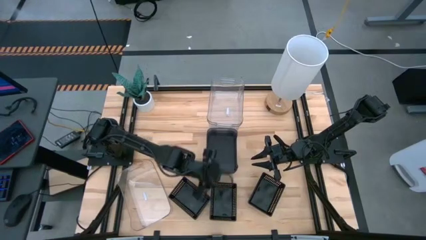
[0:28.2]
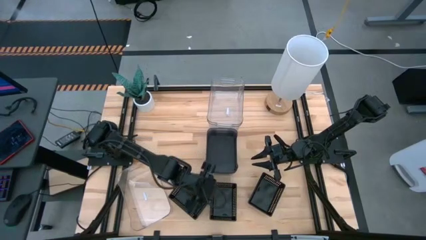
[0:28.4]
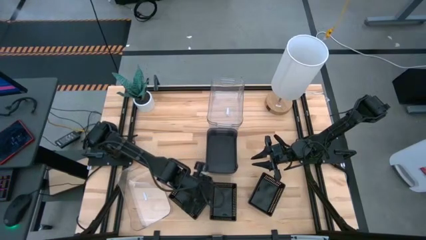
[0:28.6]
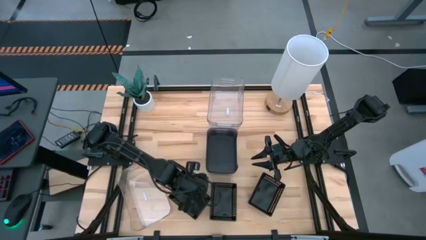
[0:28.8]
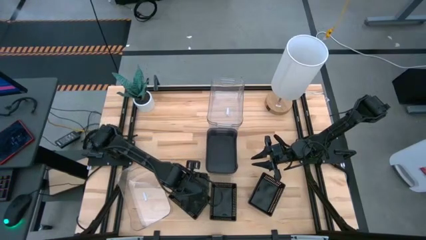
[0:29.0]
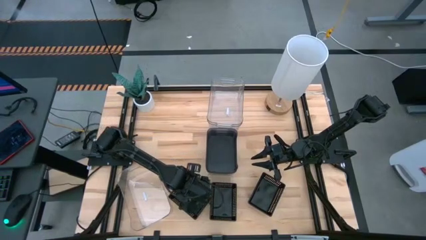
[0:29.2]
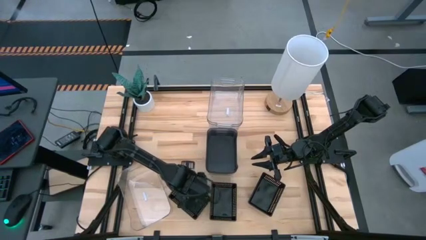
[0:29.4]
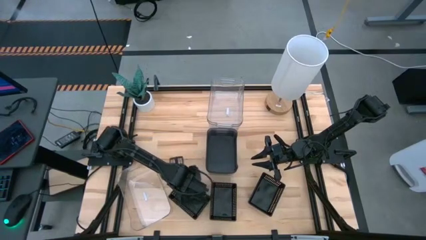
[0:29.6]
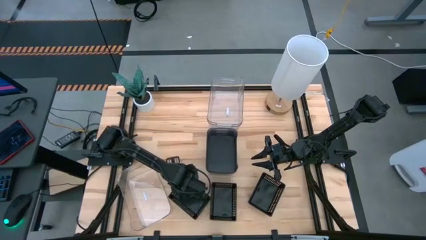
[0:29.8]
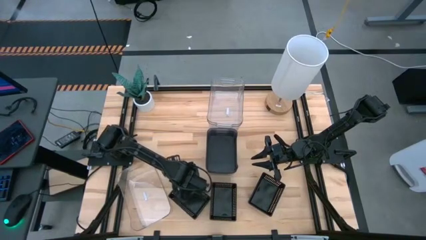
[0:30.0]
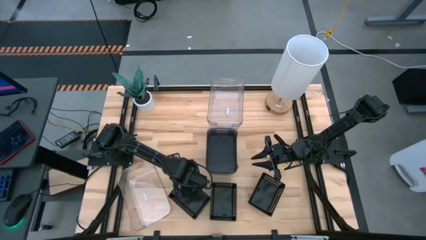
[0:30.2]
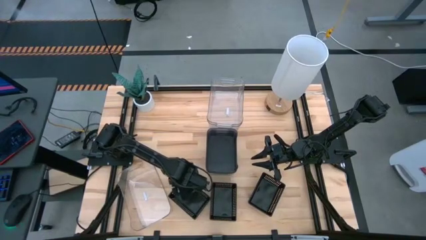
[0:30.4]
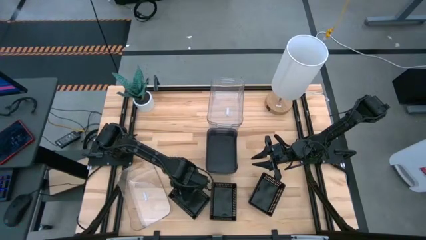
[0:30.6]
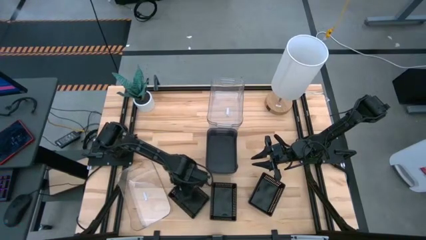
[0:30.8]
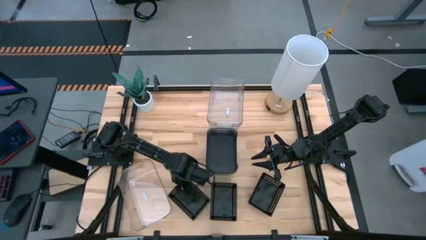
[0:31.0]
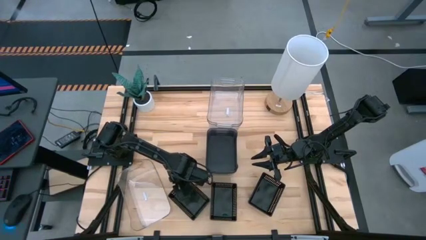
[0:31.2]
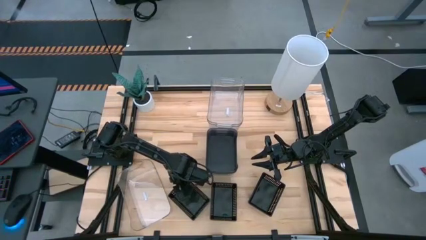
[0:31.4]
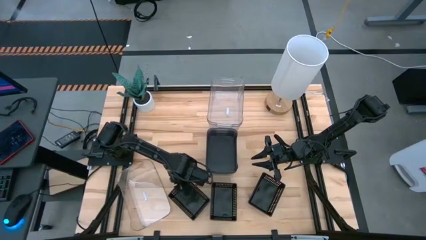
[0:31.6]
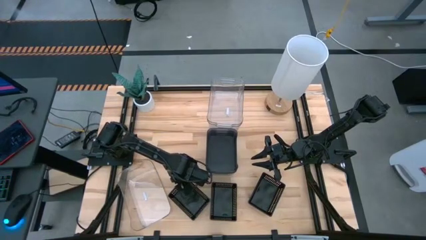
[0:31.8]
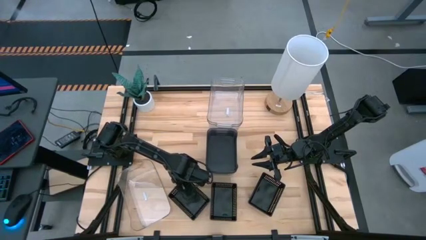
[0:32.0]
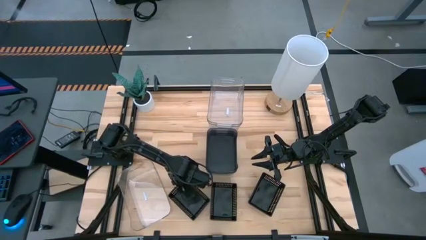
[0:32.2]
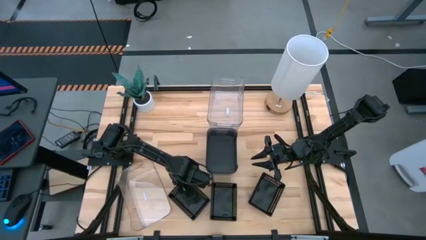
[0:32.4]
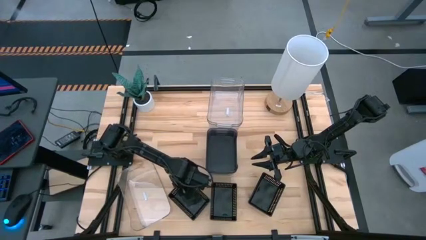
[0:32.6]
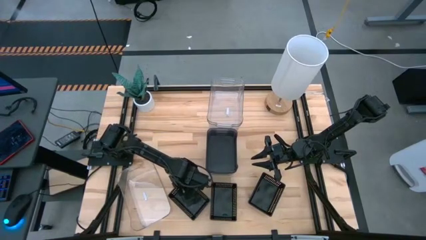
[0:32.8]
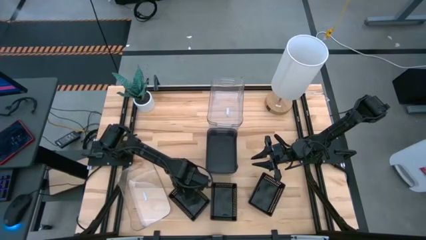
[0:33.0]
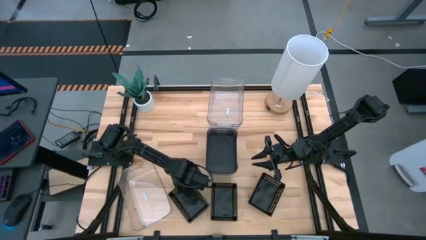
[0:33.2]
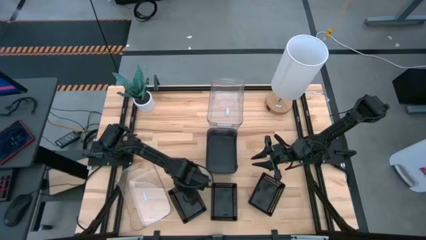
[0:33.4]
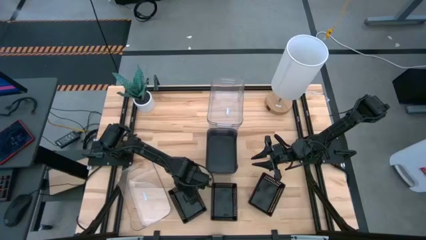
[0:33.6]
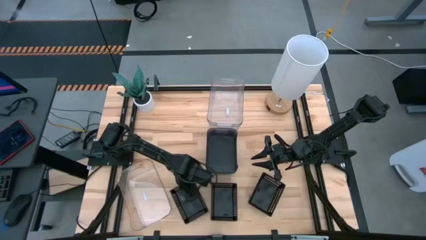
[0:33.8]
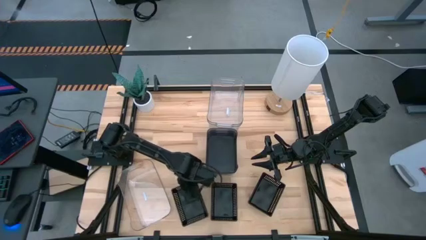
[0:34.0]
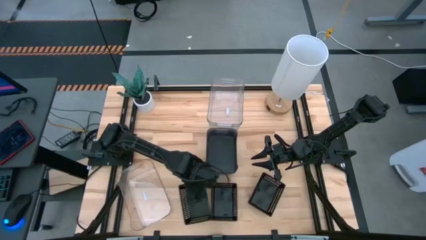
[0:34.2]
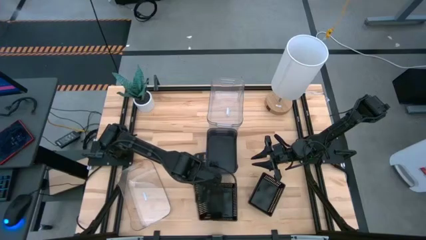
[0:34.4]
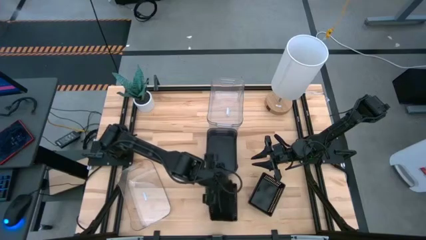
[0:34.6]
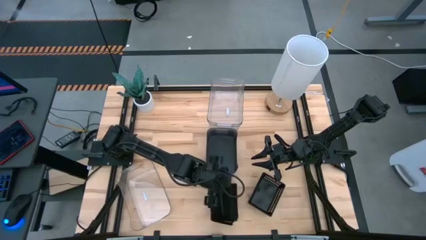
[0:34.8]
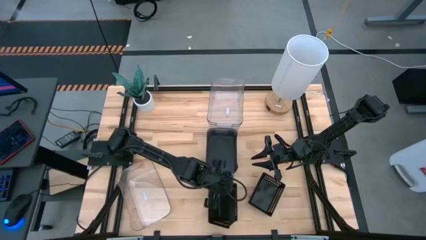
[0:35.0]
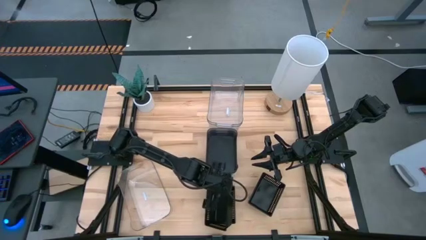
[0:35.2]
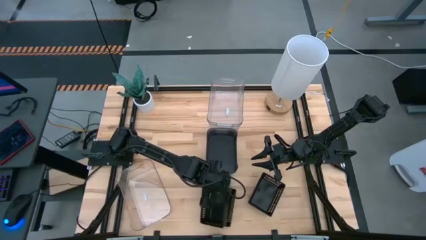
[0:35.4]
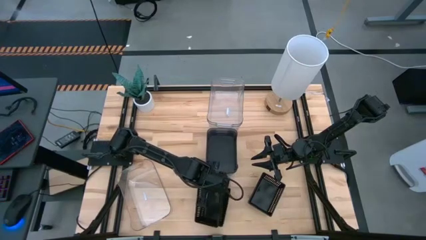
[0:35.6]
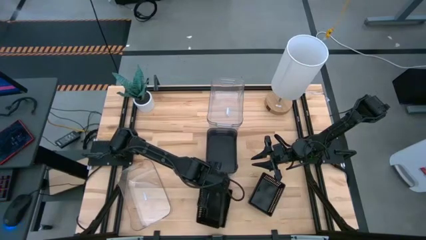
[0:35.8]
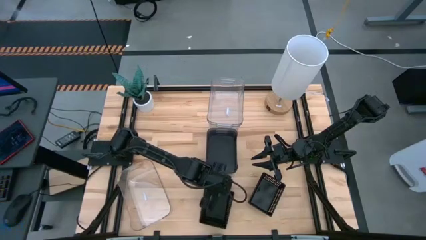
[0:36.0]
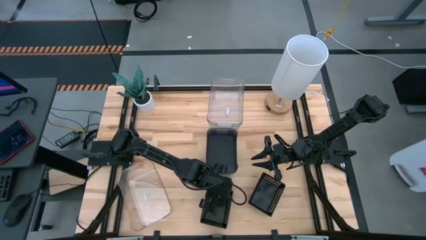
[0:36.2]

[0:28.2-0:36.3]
Stack the left black bin on top of the middle black bin

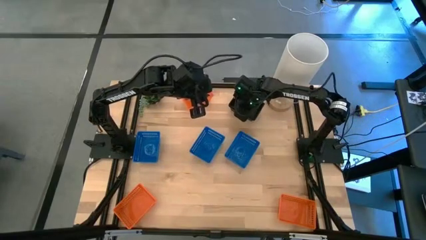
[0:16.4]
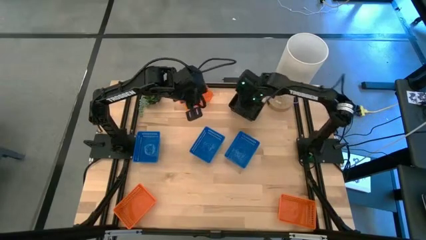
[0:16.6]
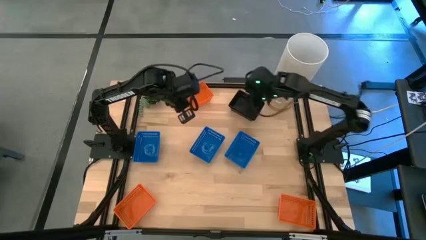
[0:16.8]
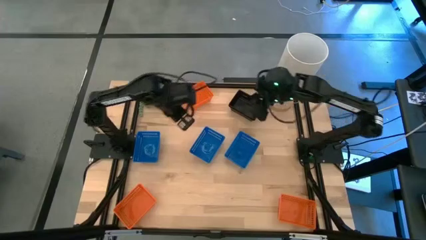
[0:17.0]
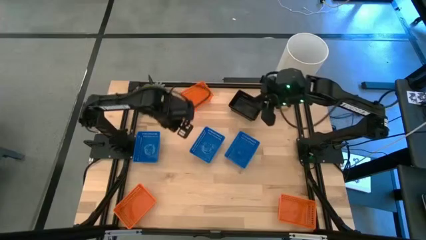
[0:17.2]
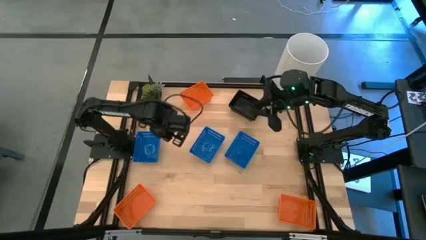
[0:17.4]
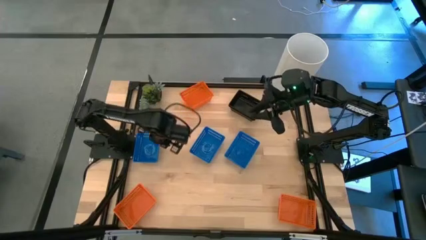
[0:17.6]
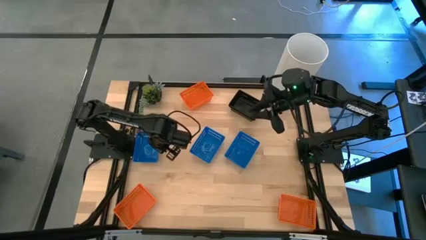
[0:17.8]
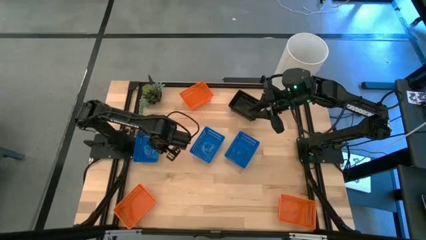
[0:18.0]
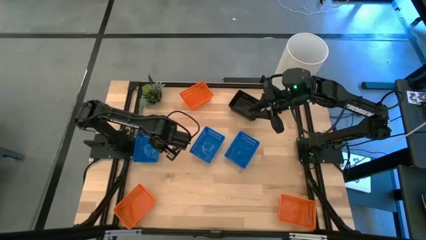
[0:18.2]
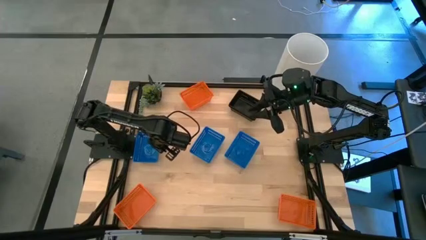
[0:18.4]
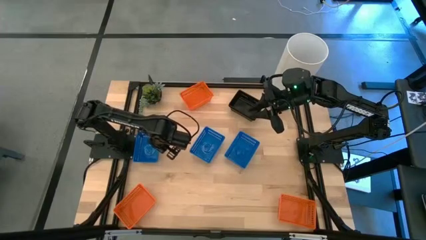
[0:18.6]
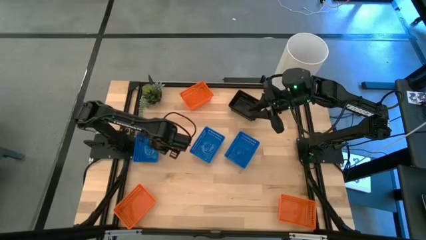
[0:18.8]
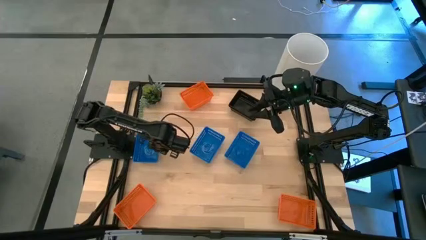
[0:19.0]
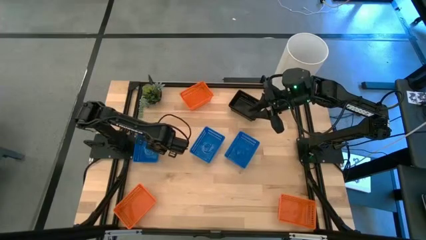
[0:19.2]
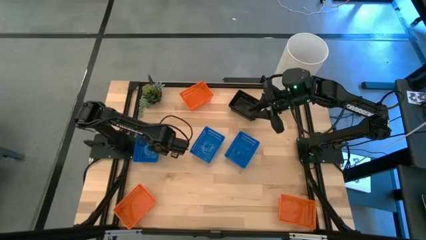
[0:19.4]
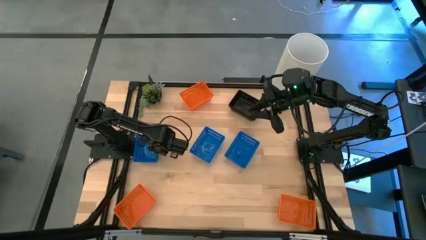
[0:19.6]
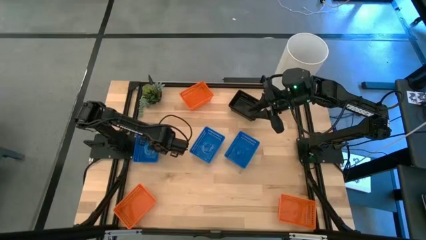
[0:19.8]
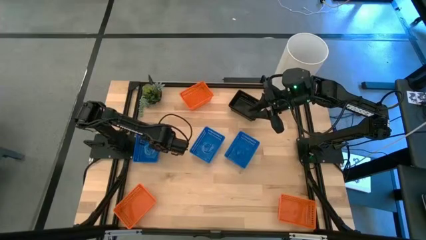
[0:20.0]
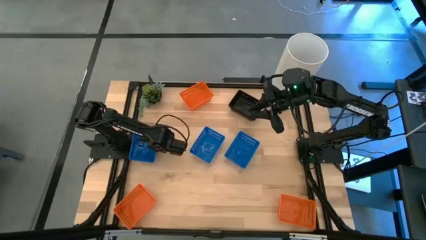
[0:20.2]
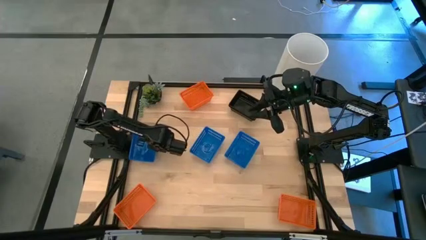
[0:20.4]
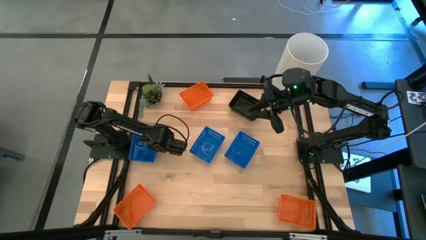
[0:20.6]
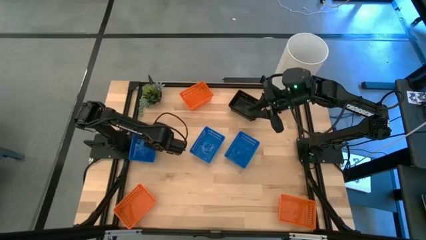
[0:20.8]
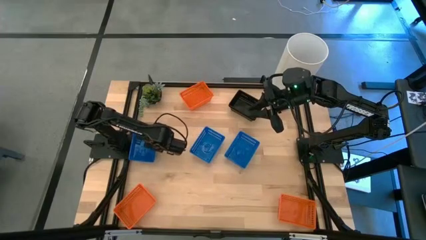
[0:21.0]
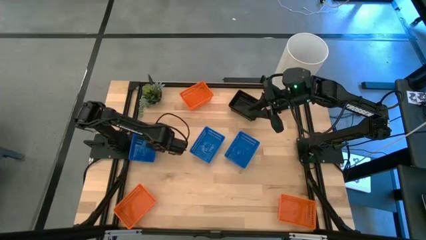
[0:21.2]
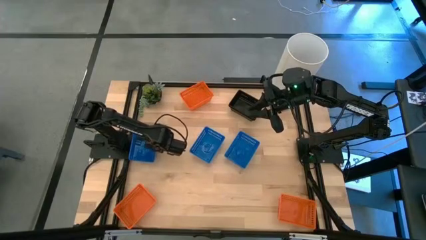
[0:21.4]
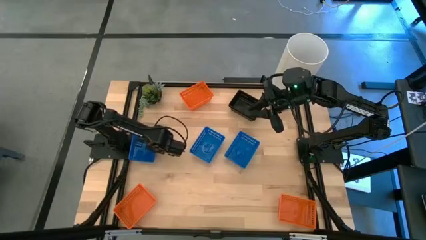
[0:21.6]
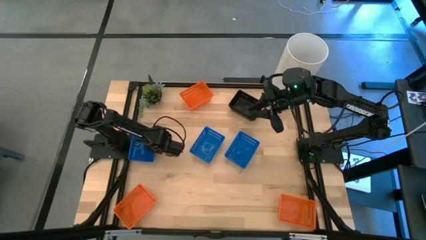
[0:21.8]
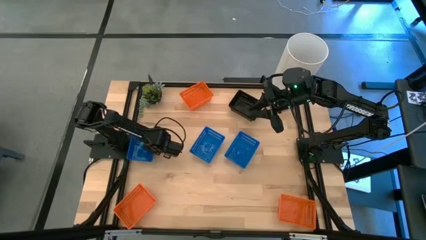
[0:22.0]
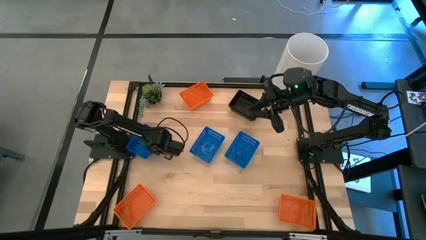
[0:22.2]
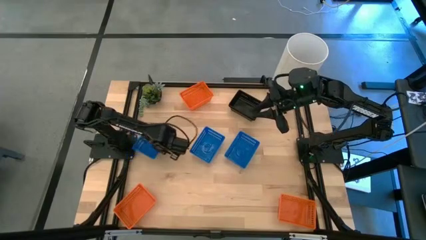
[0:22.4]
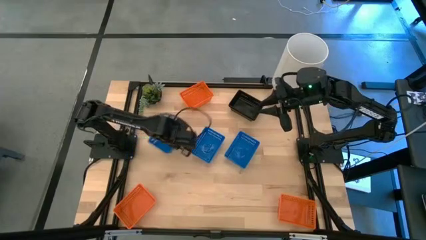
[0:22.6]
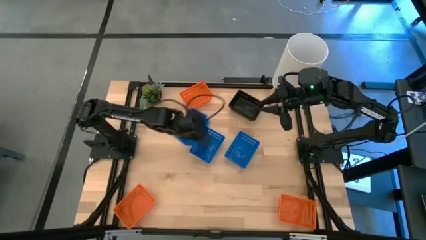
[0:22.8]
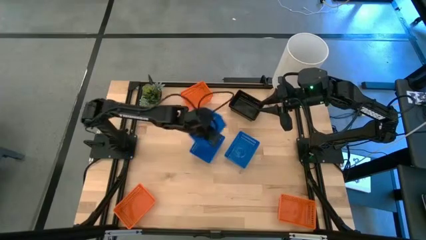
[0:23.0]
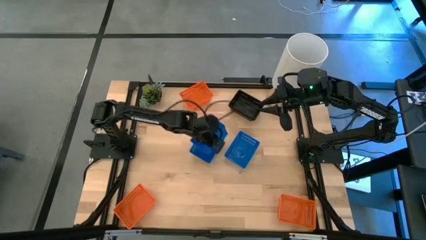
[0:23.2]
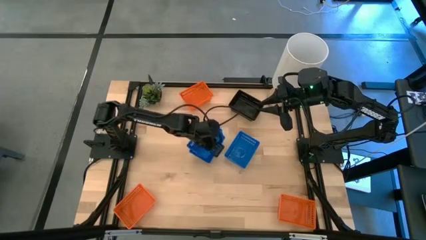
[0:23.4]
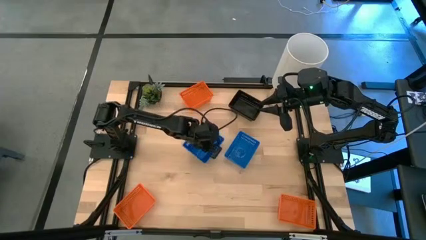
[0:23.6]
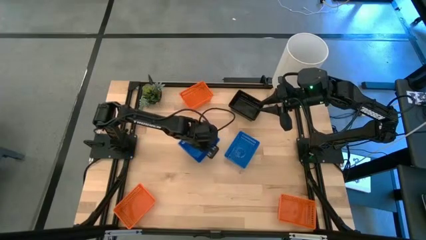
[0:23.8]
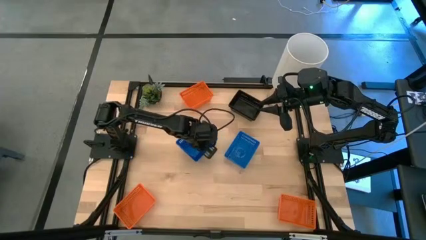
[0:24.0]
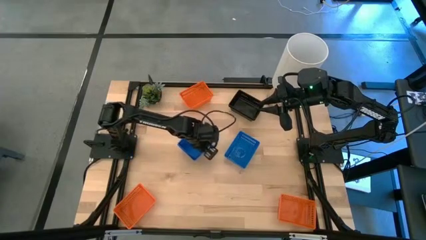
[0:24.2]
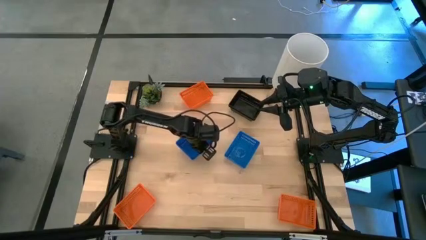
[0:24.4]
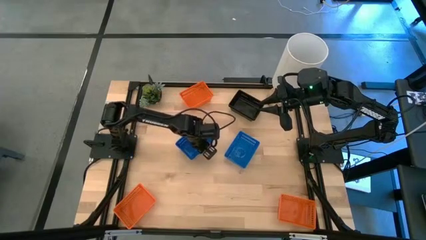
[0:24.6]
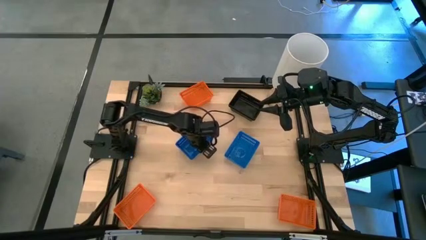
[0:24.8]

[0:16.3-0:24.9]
Stack the left blue bin on the middle blue bin
